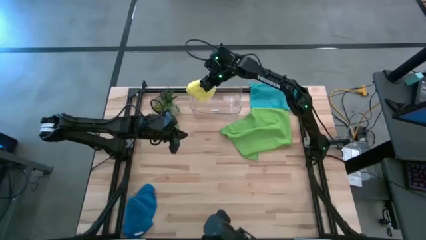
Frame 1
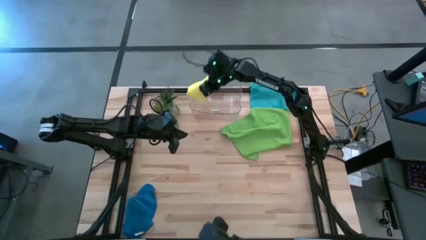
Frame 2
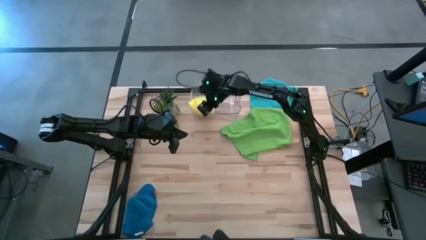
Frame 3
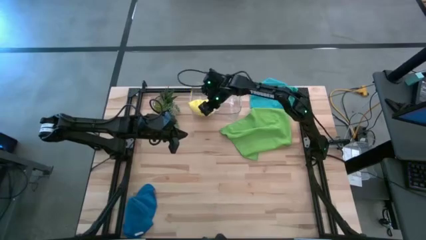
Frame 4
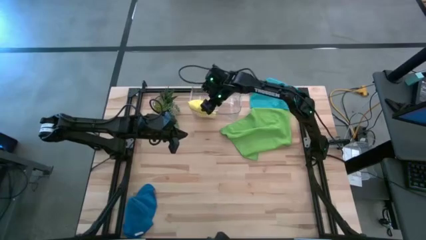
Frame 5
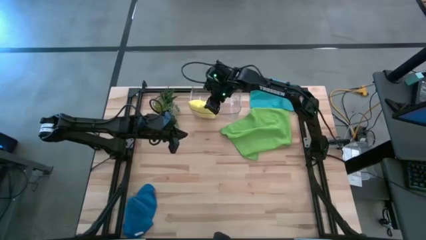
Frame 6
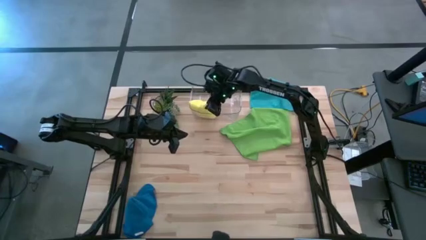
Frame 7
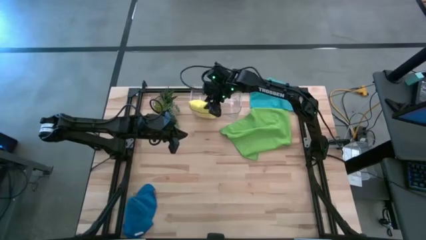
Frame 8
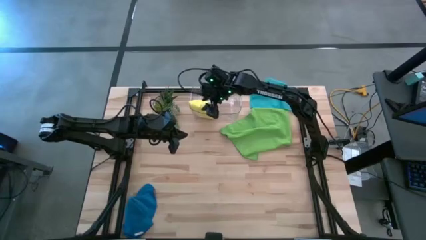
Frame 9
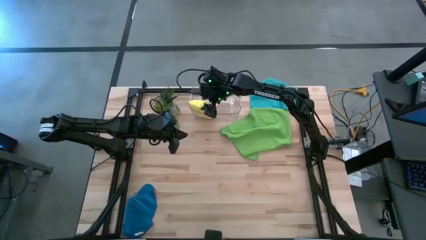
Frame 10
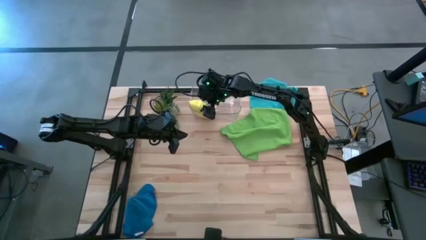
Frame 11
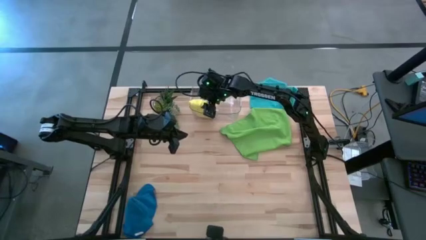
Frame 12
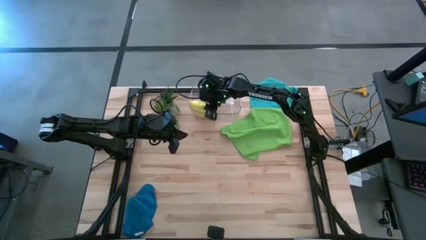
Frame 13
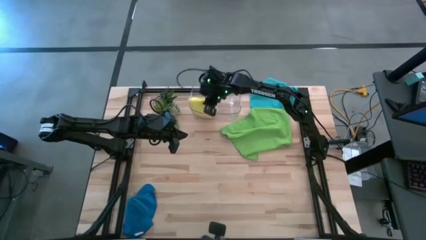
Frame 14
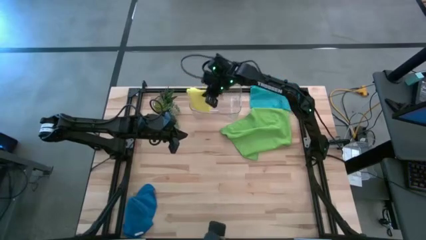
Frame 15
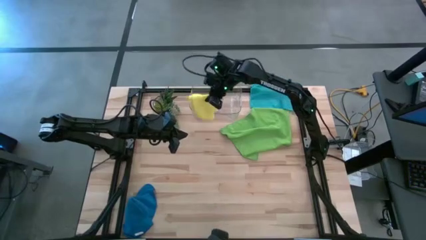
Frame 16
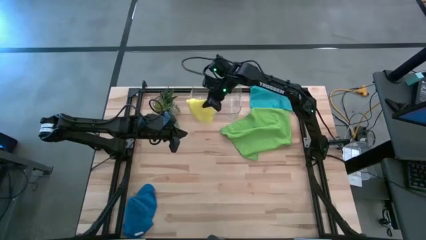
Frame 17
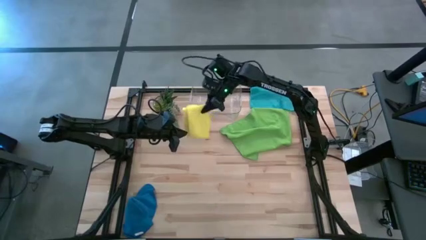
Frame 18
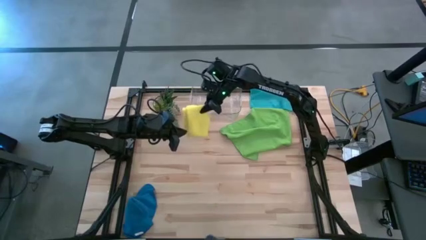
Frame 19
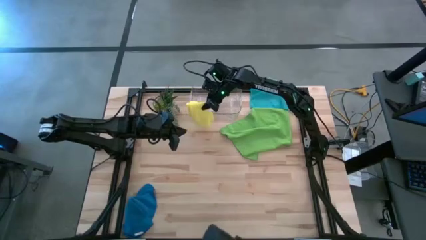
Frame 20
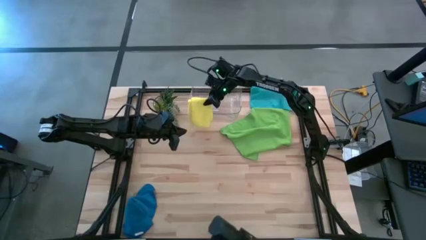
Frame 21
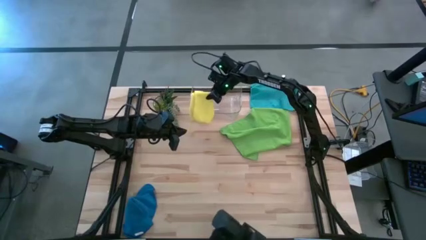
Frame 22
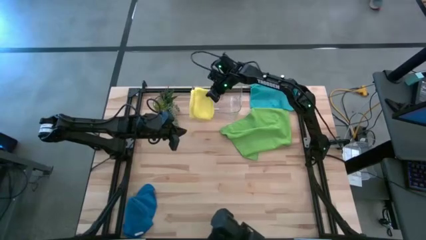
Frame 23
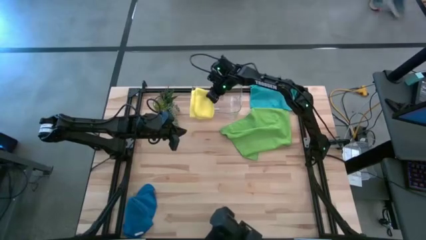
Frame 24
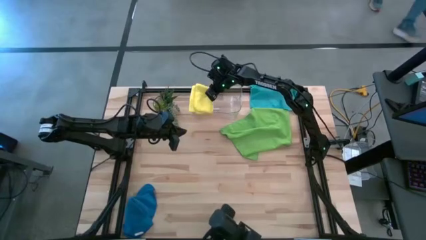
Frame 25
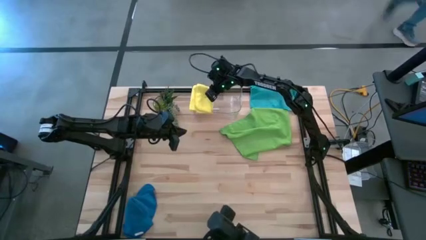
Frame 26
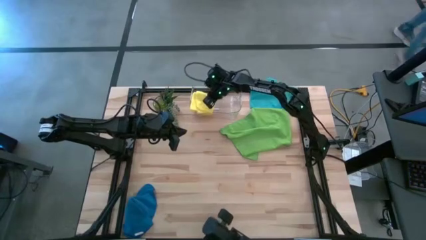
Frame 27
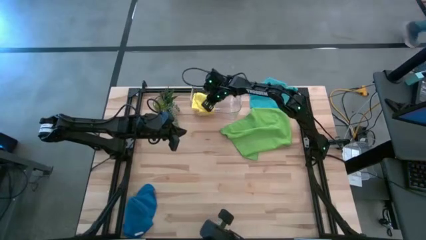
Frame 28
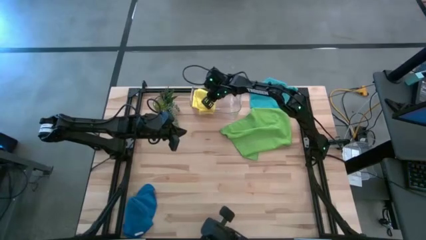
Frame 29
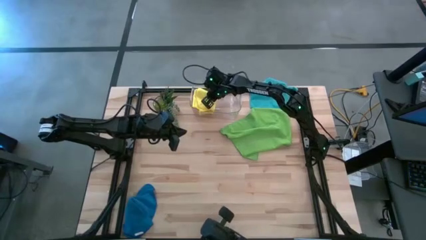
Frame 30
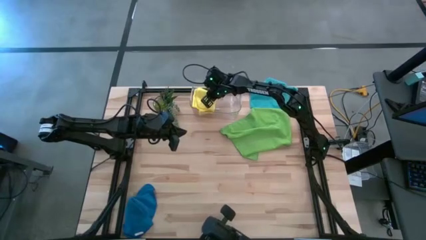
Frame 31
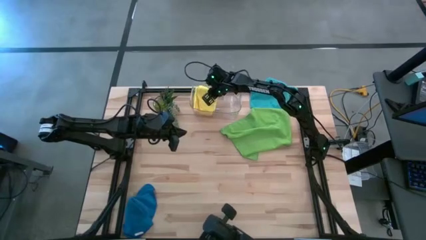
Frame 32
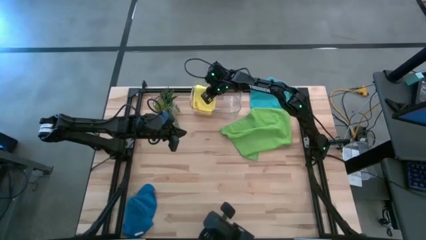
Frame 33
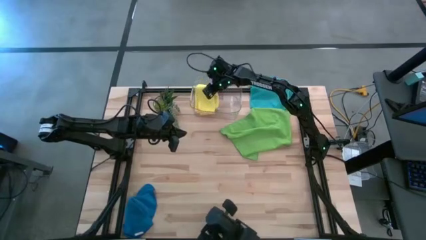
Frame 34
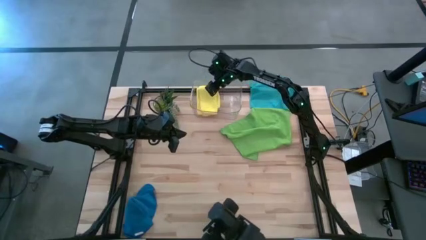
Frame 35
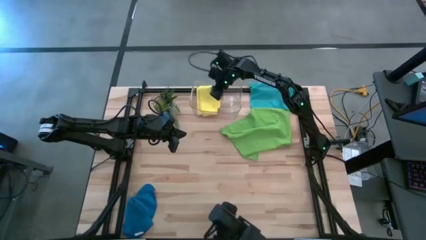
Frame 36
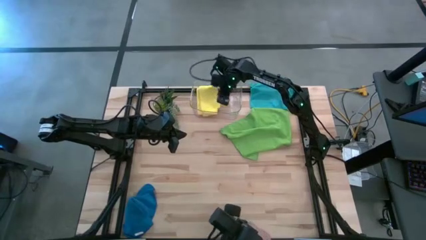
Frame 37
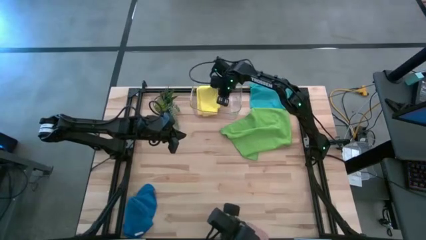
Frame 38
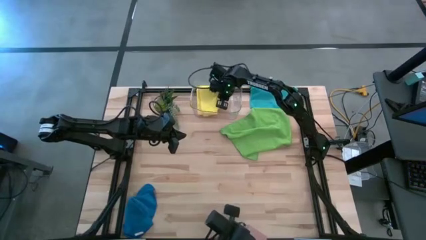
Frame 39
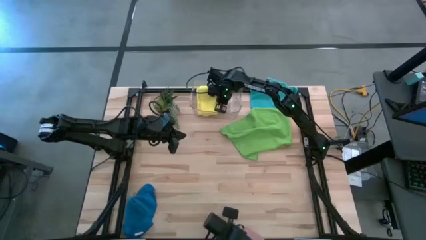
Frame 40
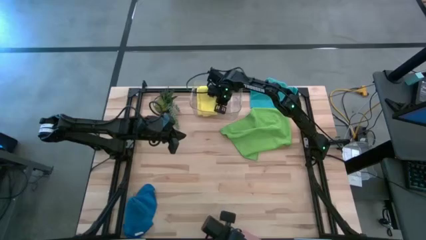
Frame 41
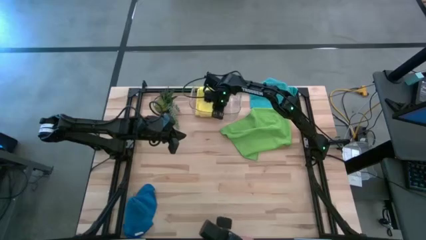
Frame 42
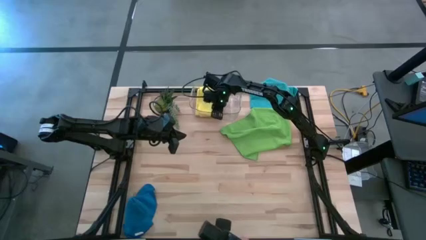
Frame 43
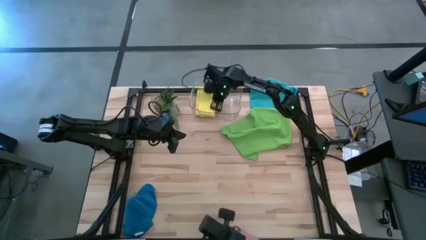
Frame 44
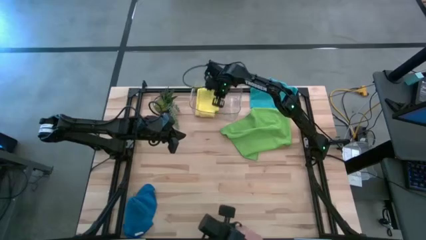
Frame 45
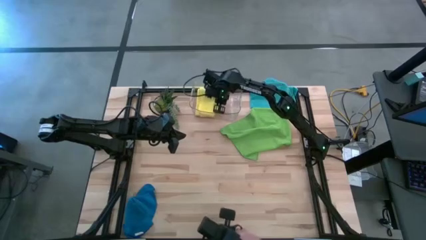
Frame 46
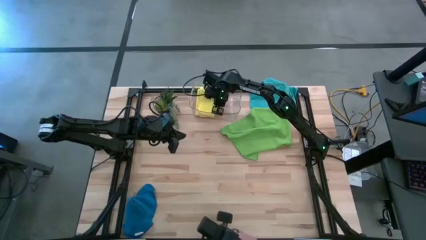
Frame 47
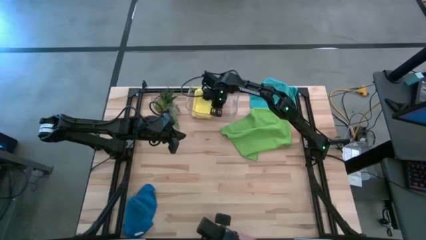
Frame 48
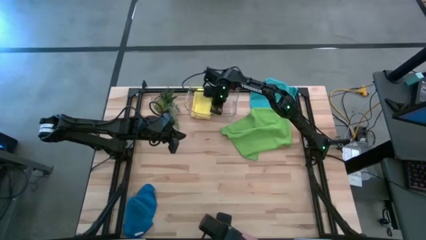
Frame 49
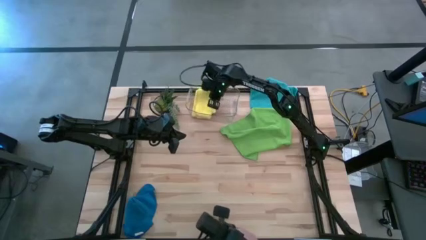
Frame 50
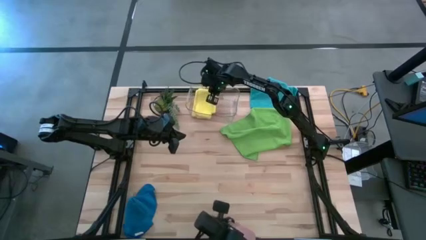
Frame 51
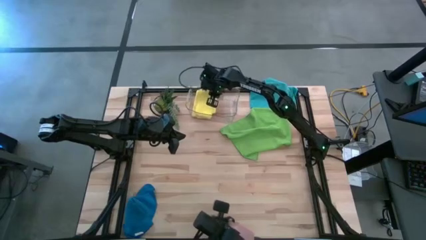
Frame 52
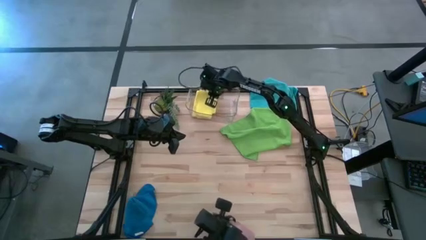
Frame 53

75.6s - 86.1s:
Task: Fold microfiber towels
Put the yellow towel into the bin

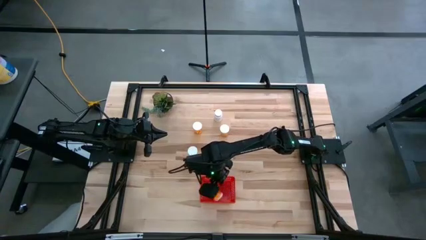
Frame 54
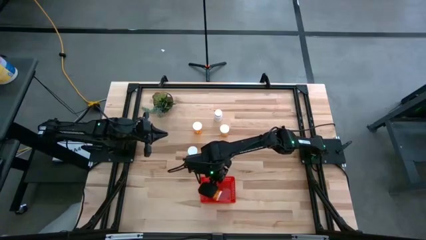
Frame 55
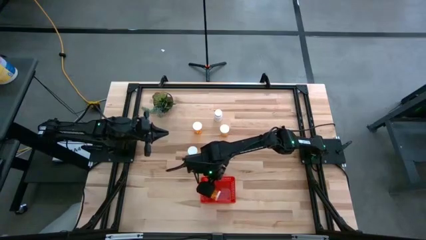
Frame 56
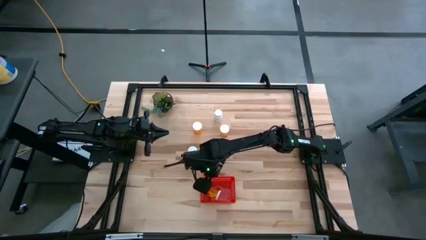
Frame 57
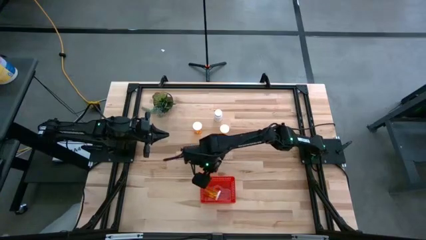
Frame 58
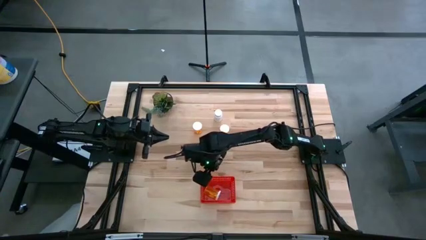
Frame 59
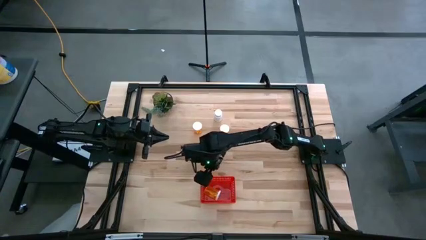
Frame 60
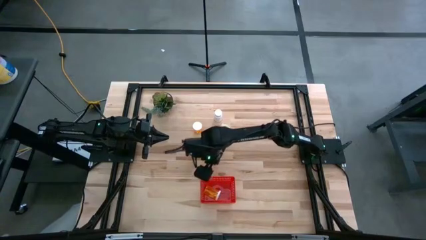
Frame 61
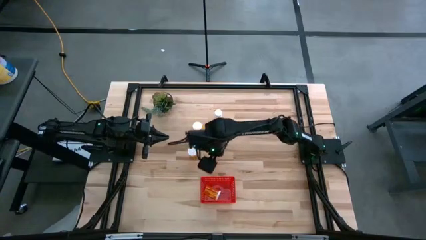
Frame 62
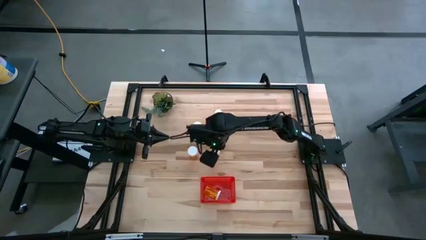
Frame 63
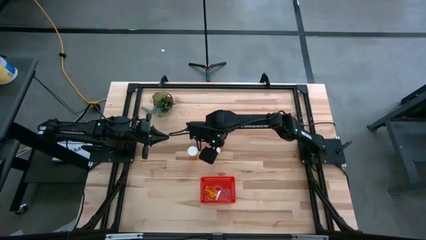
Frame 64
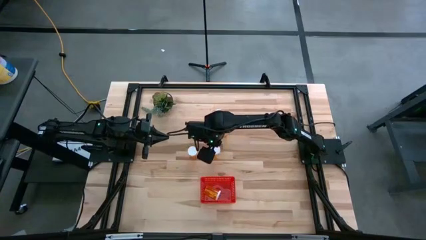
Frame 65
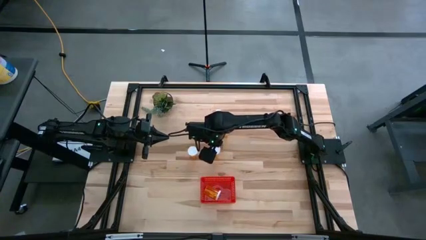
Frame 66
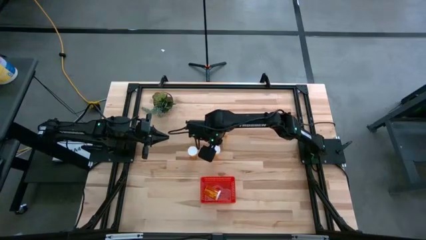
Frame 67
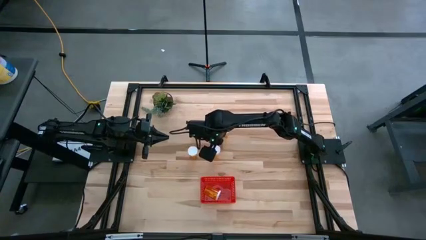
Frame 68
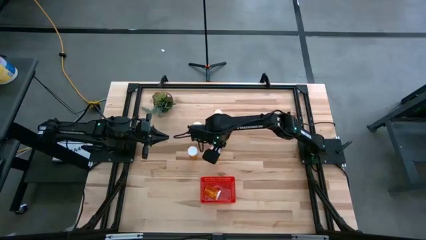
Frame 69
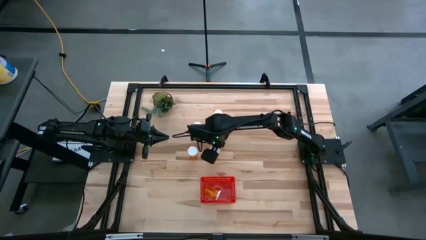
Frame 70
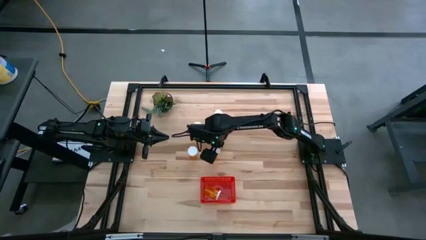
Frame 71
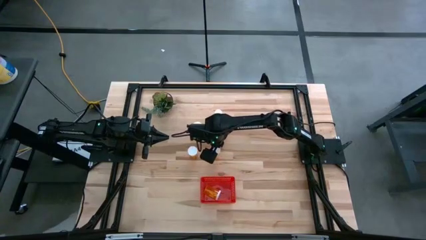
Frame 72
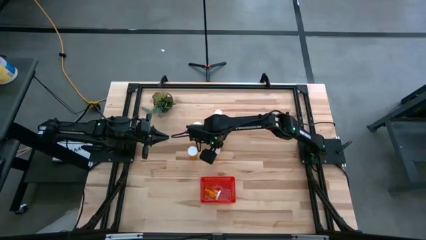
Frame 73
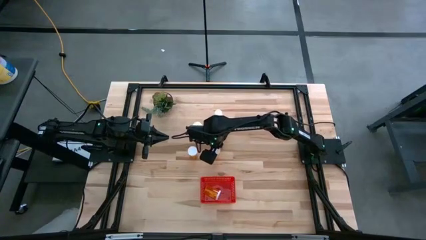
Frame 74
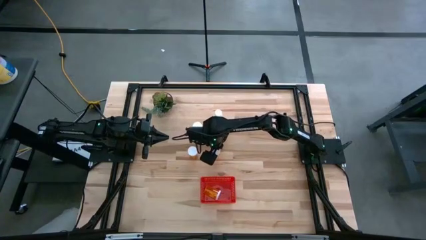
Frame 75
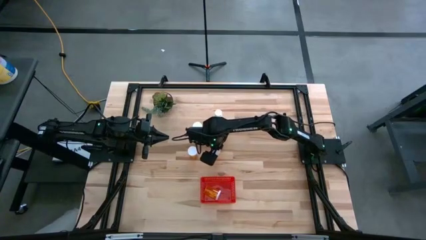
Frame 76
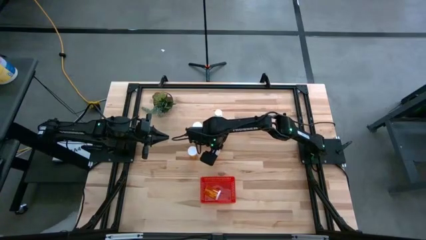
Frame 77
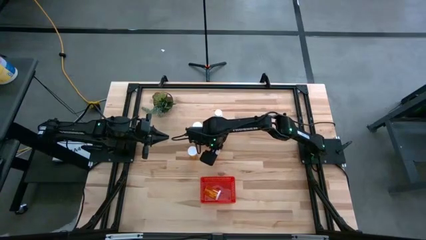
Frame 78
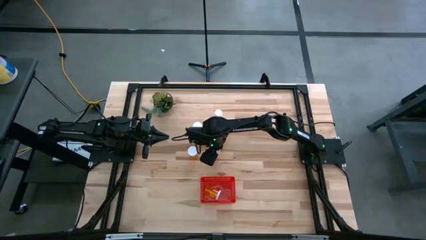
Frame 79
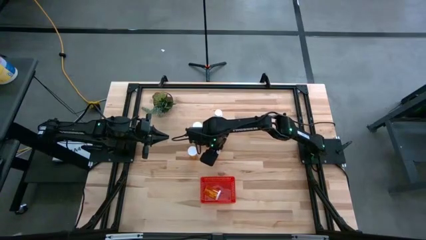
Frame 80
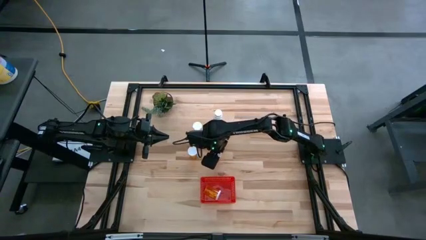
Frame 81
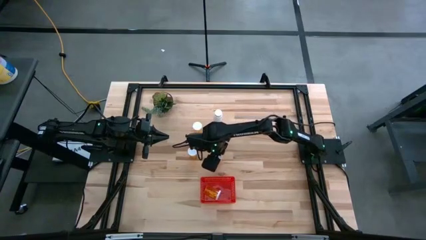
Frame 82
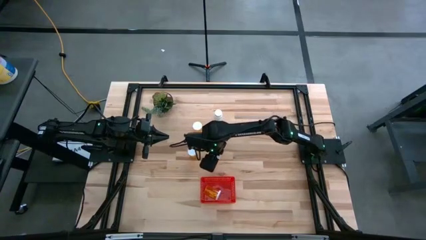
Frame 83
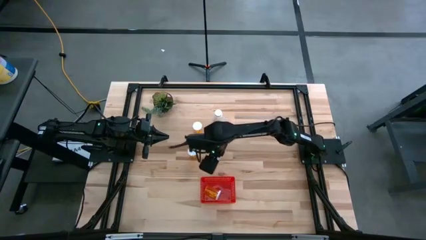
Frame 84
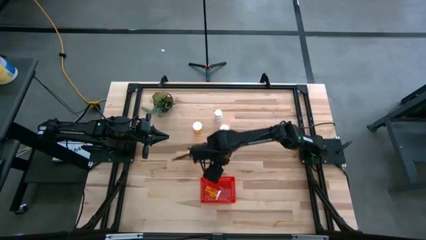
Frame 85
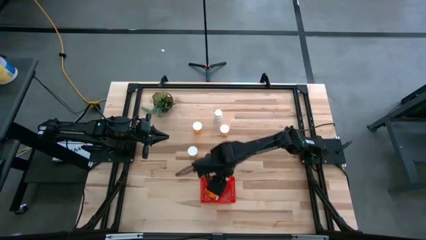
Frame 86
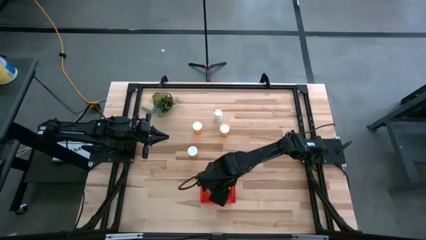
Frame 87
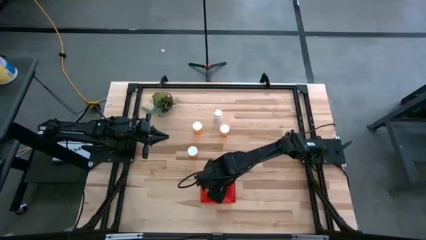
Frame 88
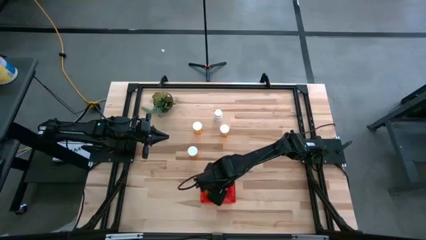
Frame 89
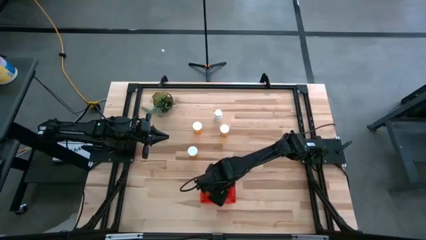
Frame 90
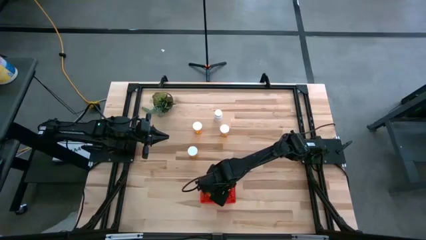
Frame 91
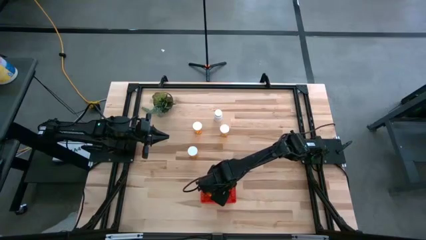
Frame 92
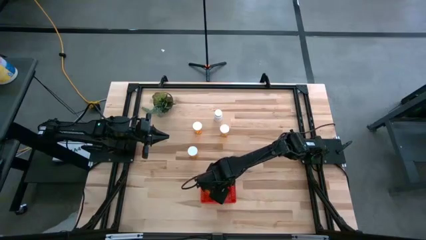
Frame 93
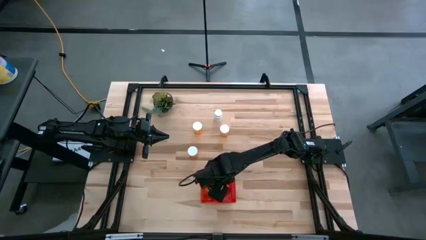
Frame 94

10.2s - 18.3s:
Task: Pick and place pill bottles into a basket
Put the orange pill bottle into the red bin
